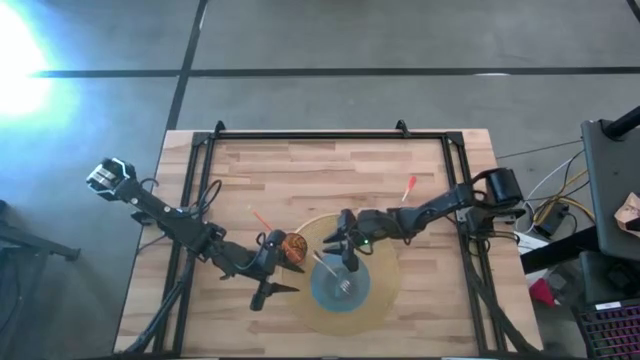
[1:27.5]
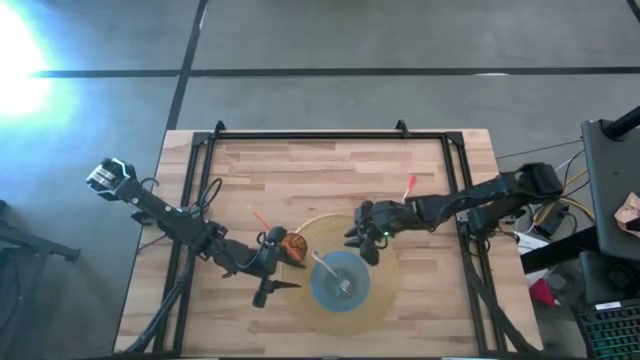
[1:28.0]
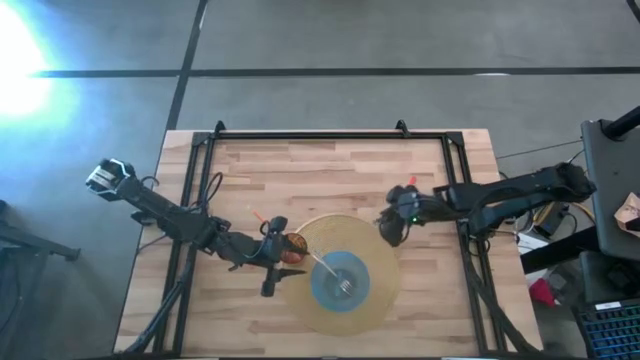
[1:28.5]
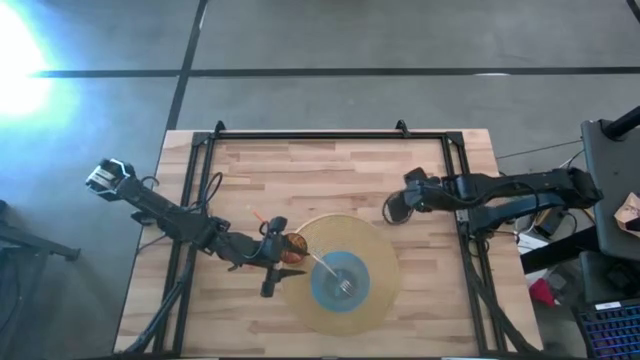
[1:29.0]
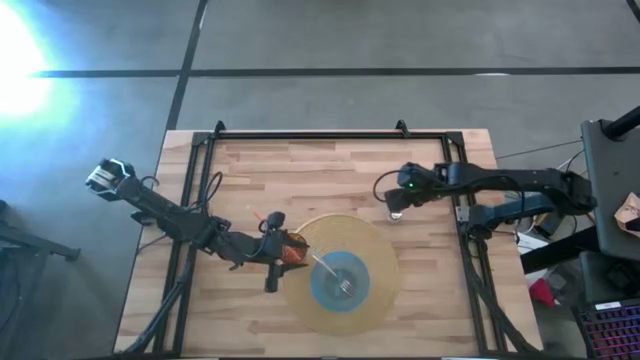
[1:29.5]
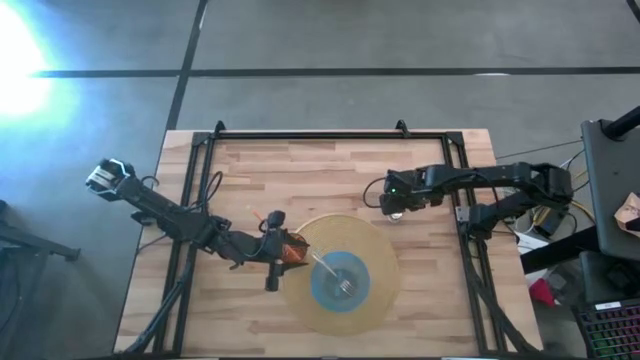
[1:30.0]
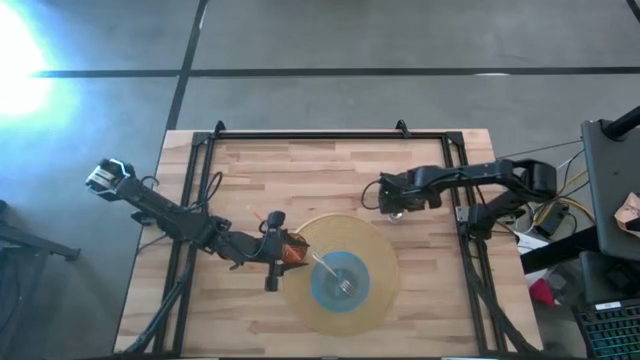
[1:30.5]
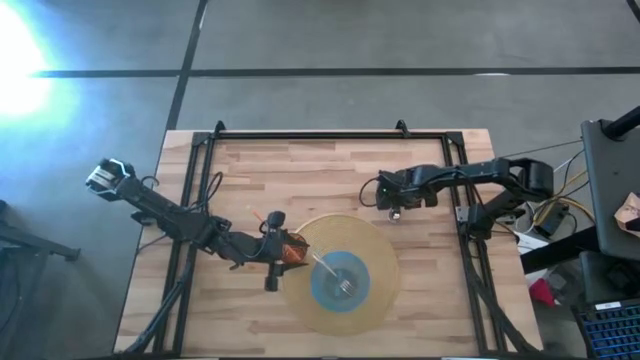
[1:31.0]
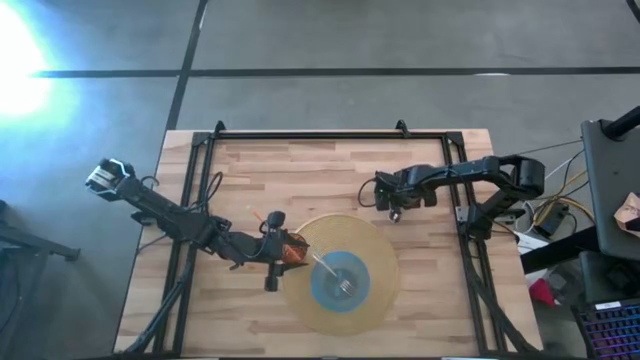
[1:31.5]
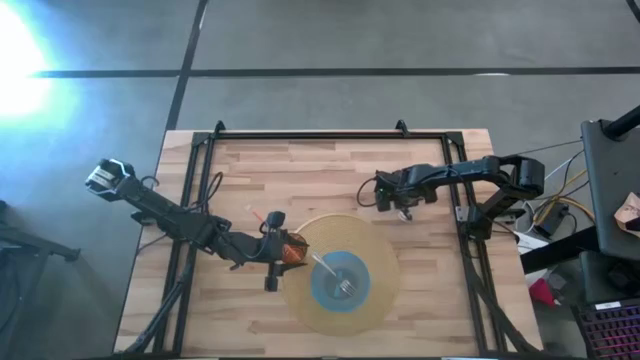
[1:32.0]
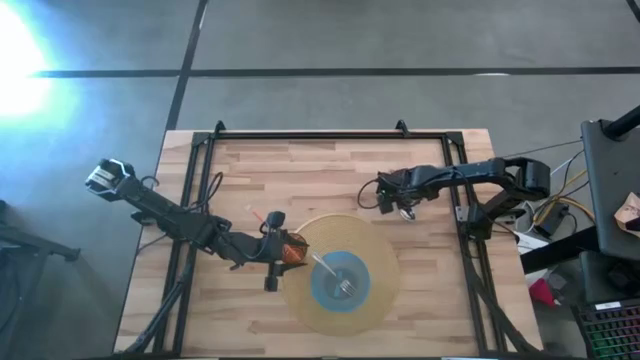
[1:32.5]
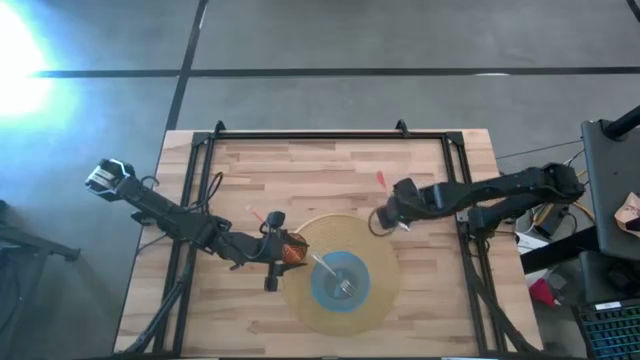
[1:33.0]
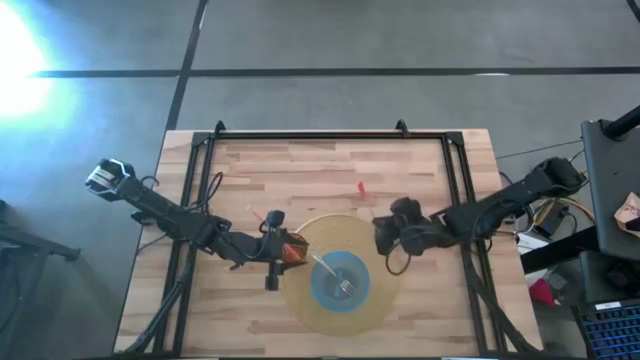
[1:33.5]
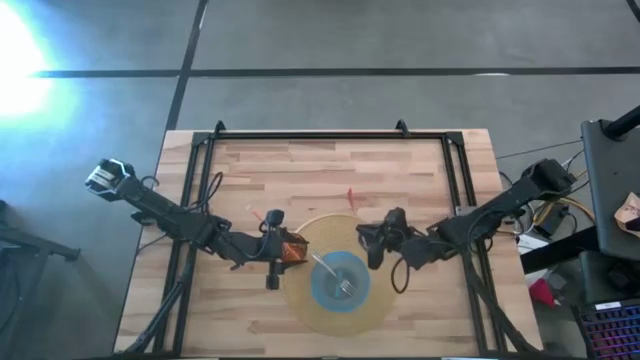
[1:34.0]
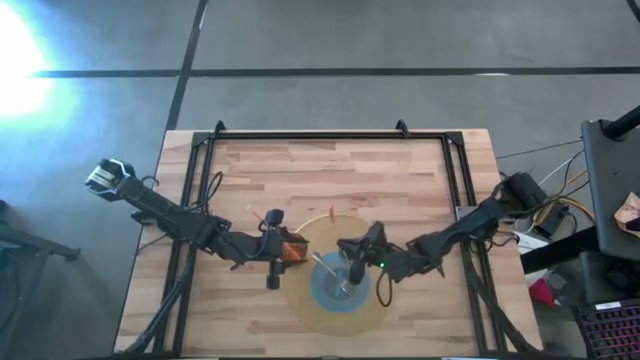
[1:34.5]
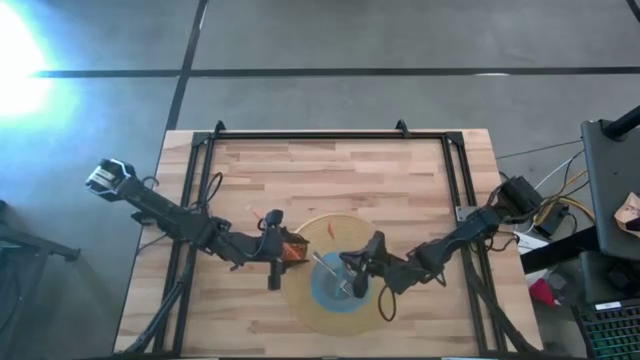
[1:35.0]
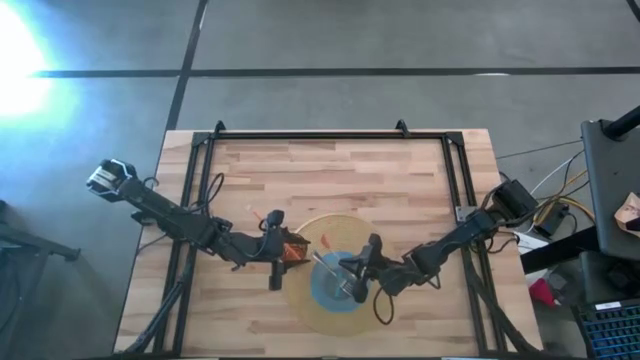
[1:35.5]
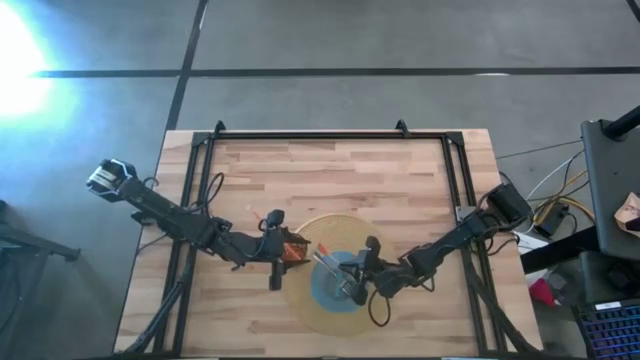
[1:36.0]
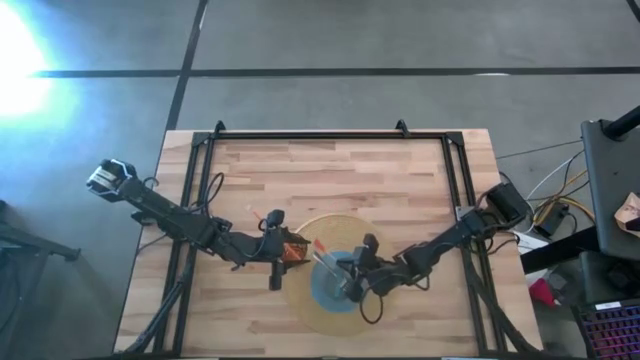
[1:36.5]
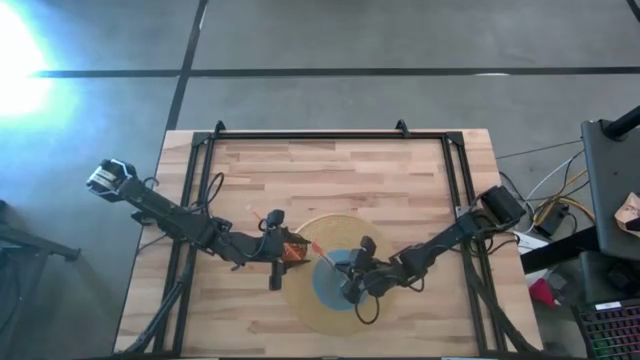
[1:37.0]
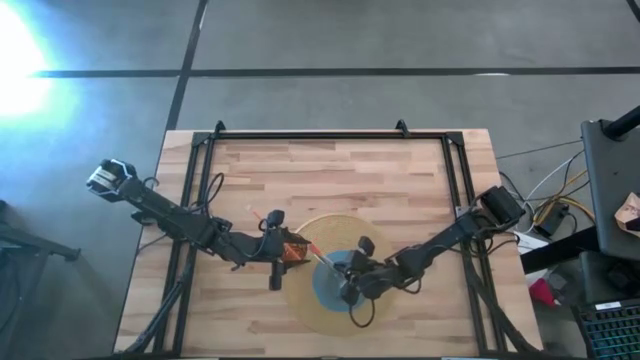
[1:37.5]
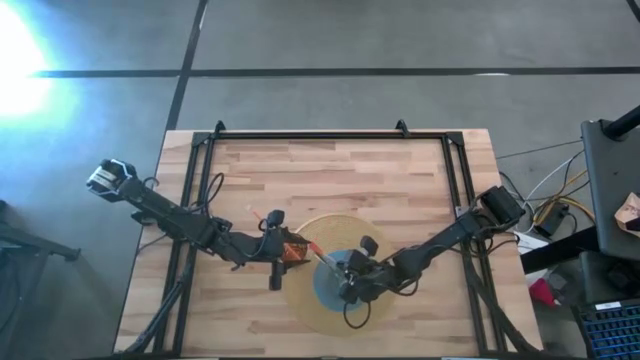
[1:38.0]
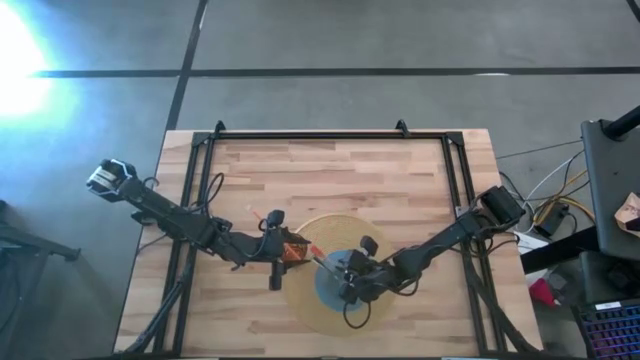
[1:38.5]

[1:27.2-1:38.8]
Task: Pick & Place Utensil
Put the spoon into the bowl

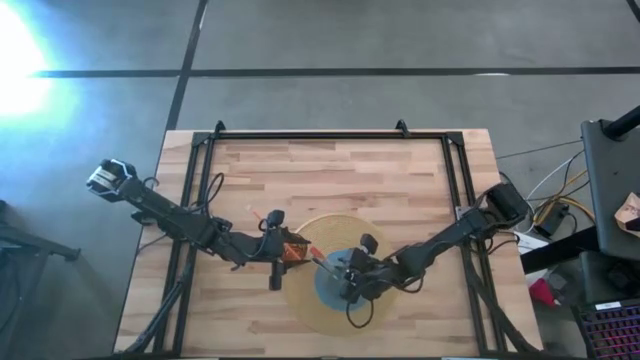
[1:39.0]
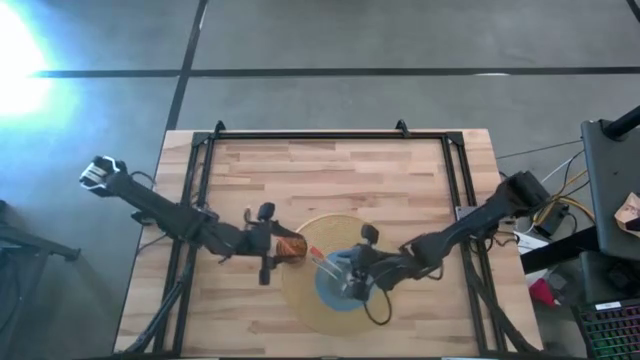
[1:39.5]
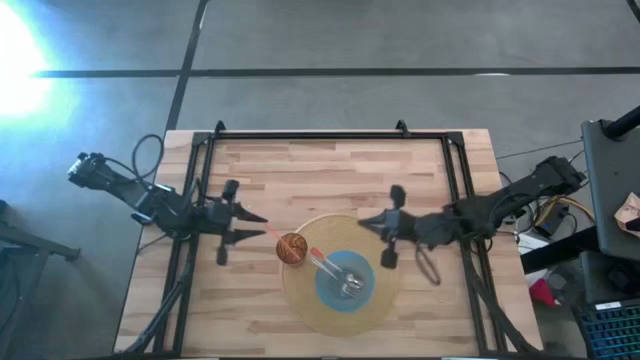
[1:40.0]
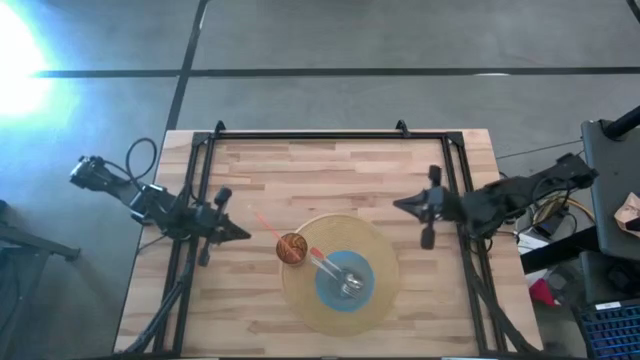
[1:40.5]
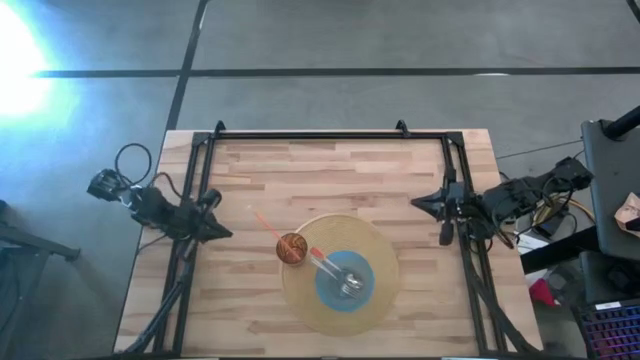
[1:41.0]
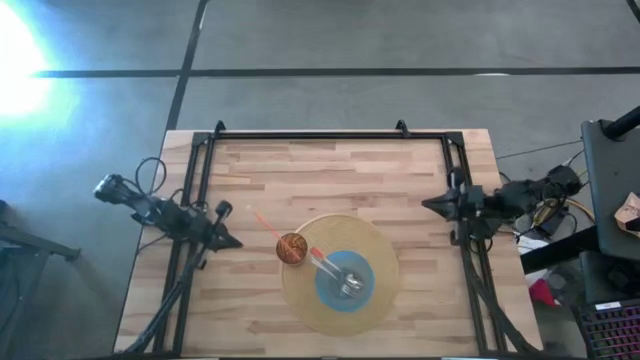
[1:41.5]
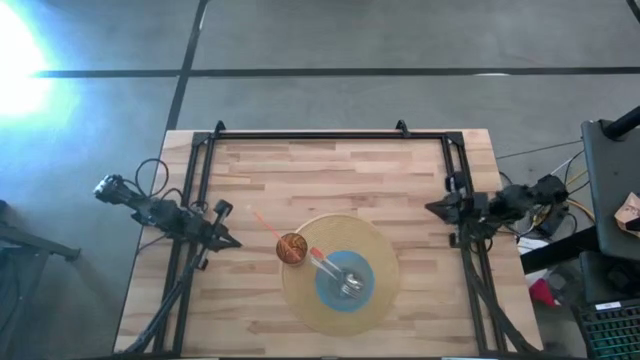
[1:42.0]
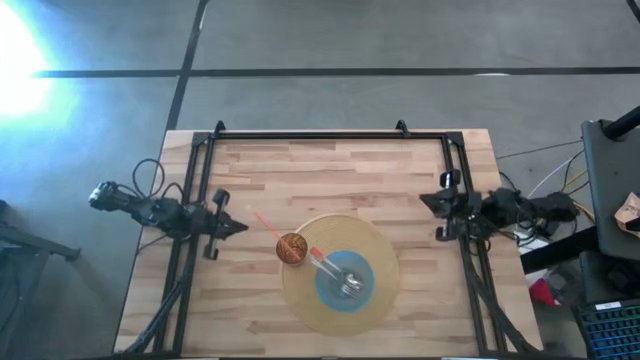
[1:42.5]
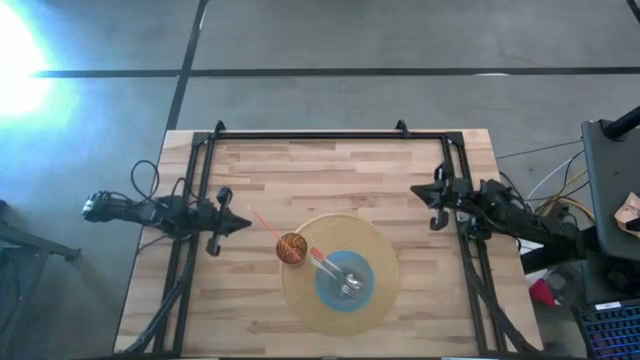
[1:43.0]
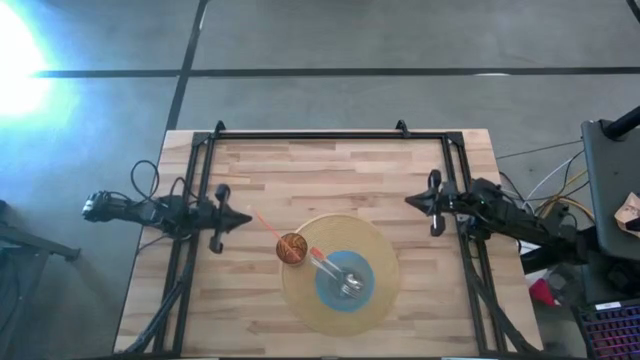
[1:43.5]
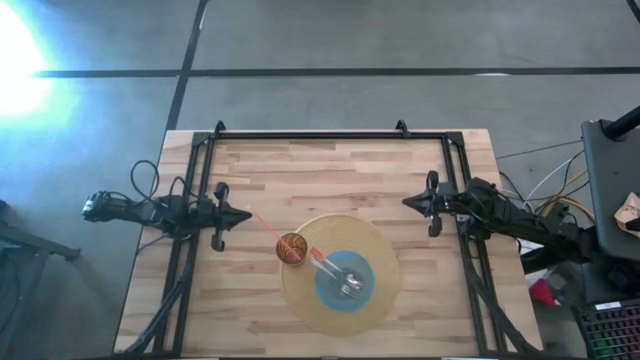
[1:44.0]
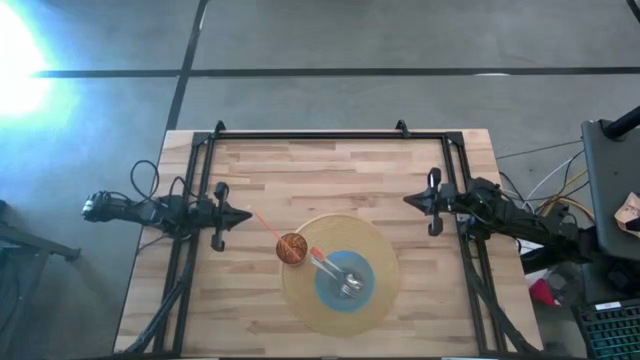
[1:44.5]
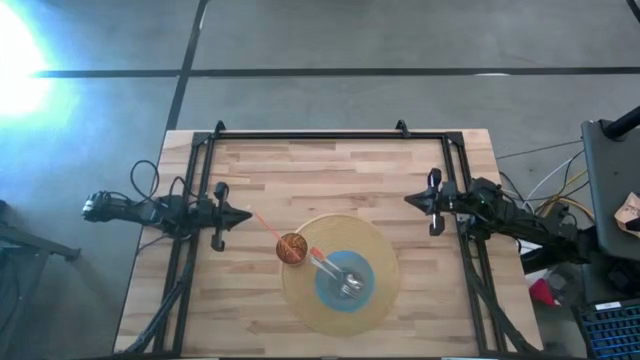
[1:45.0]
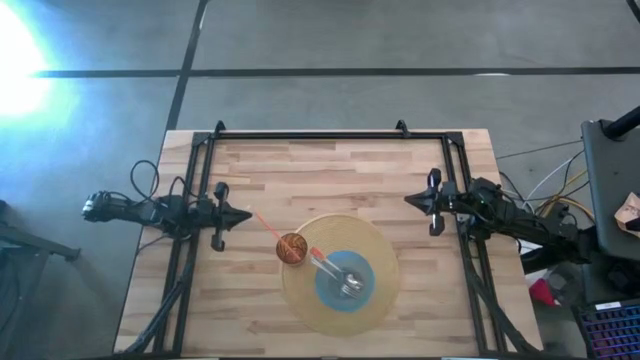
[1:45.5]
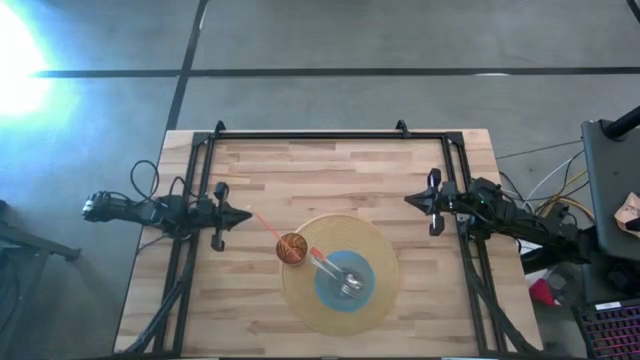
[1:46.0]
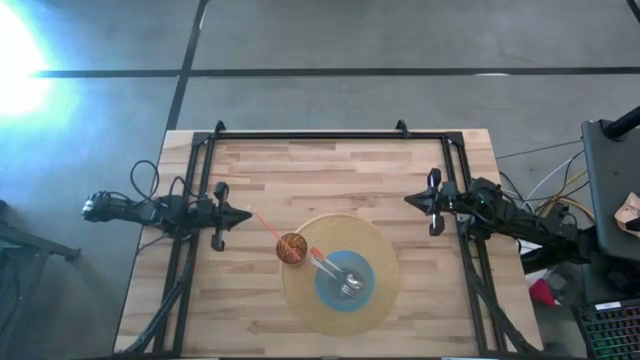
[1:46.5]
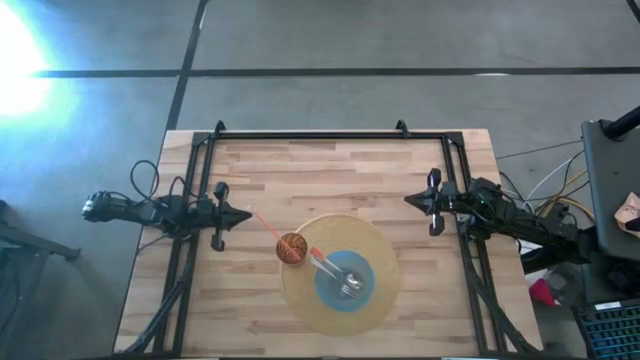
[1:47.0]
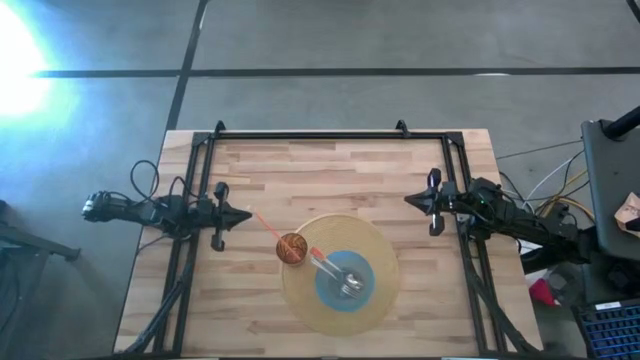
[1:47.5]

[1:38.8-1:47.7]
Return to Home Position

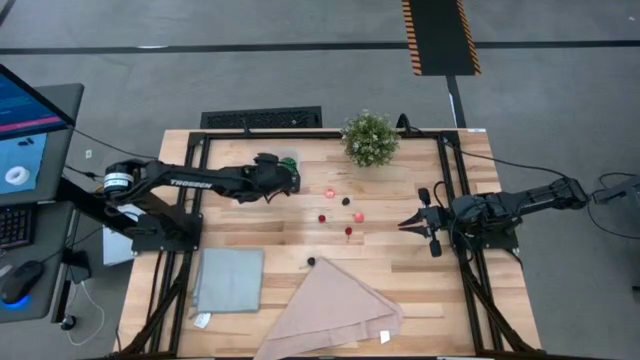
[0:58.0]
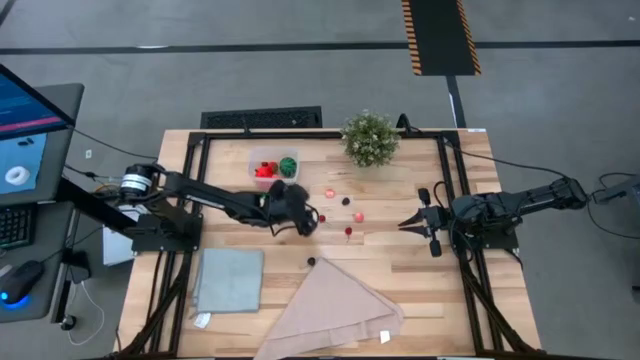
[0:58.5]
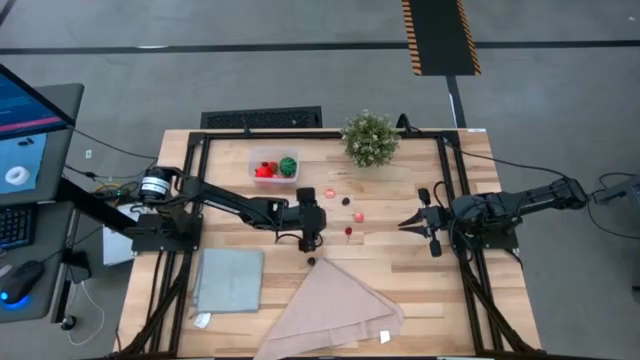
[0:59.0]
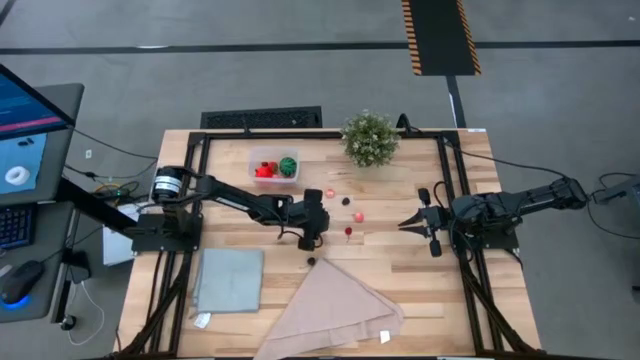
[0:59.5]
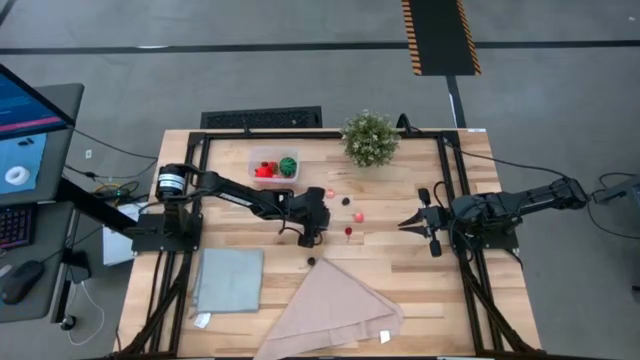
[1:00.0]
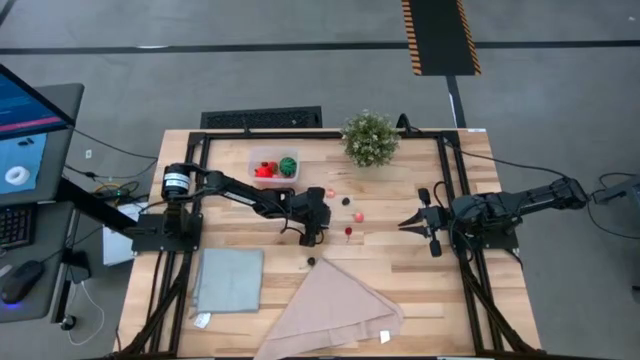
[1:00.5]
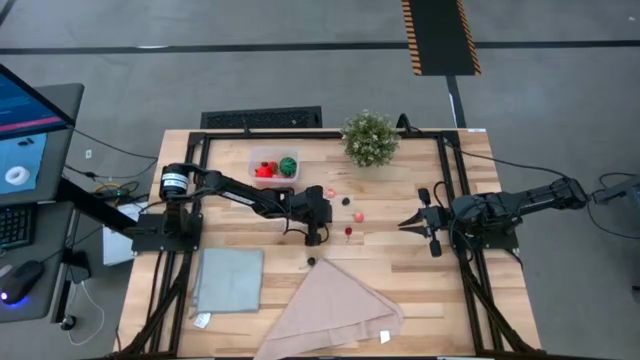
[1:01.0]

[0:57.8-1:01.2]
Task: Pick and placing Produce into tupperware
Put the red cherry into the transparent container
